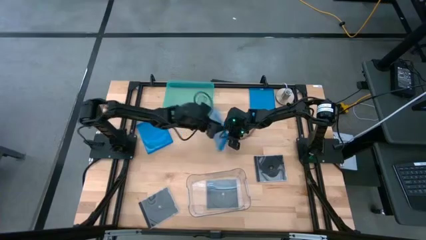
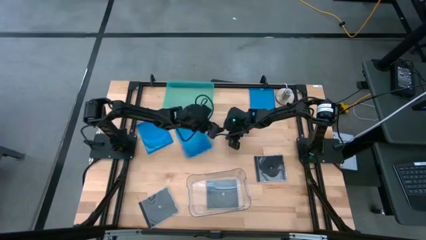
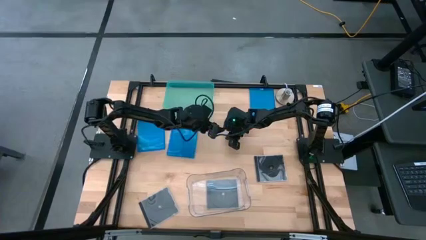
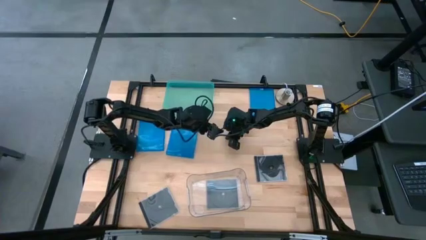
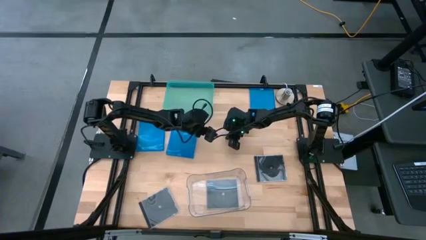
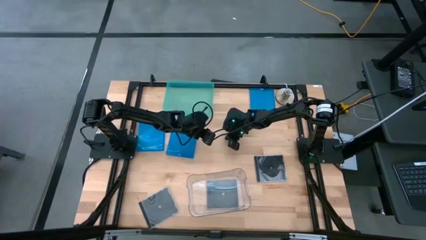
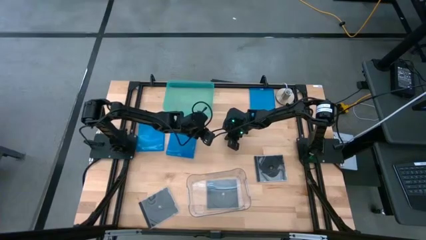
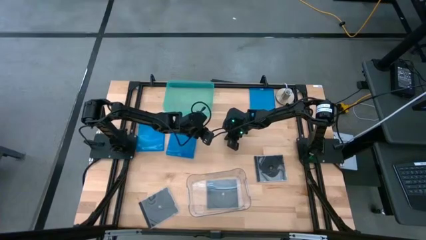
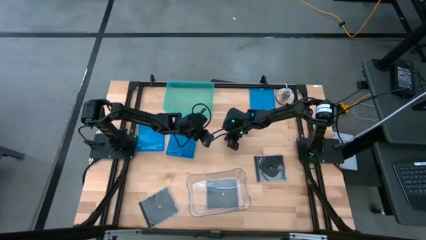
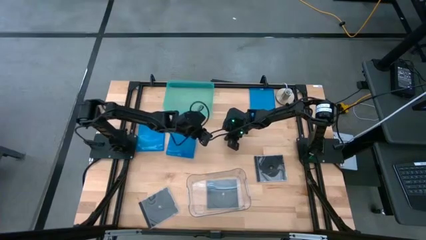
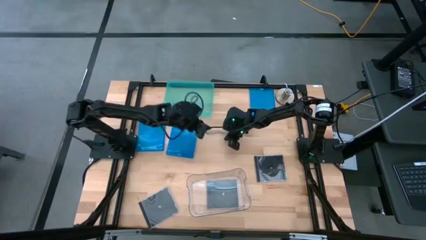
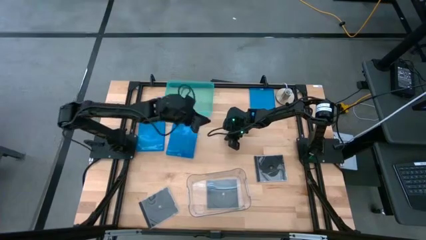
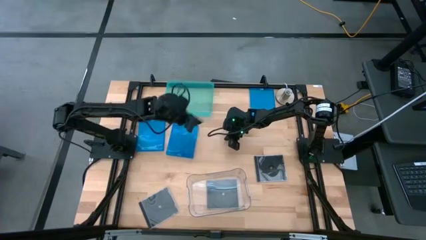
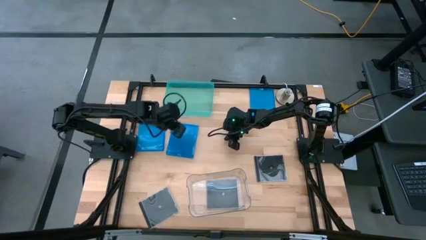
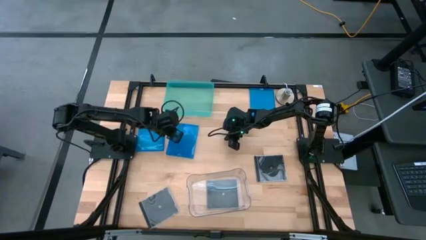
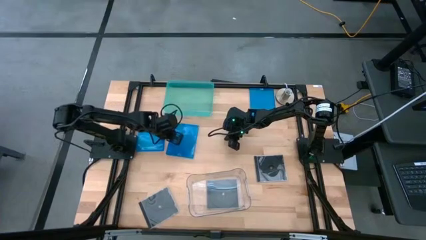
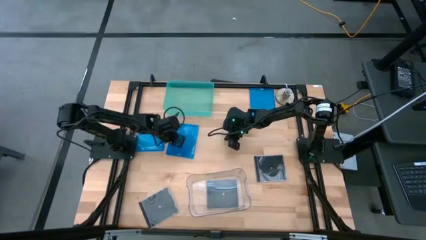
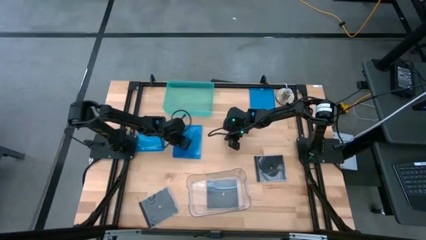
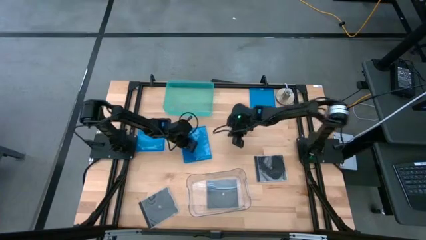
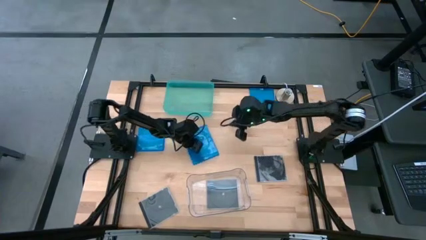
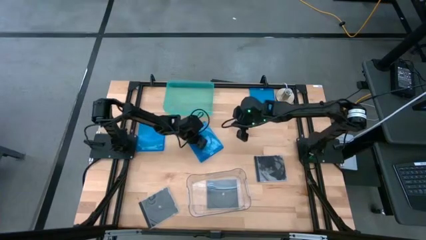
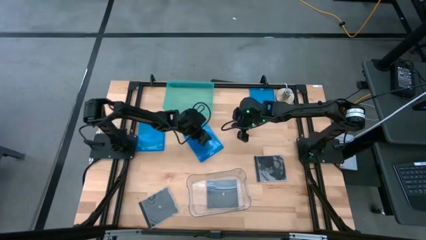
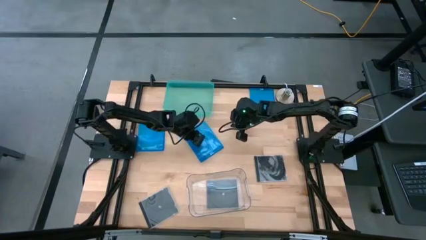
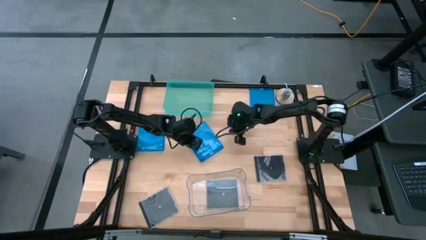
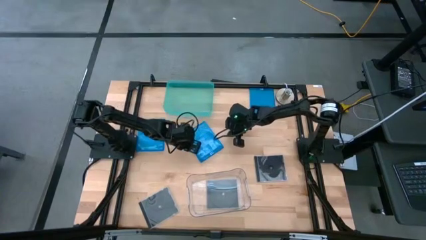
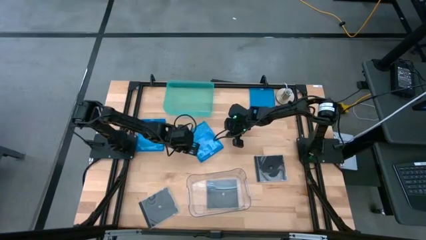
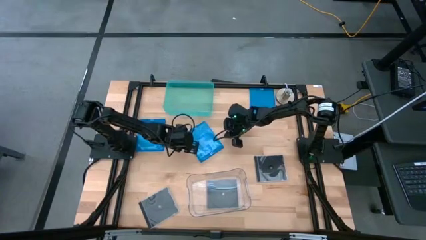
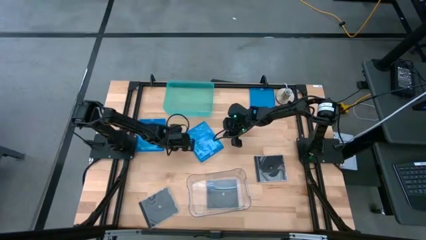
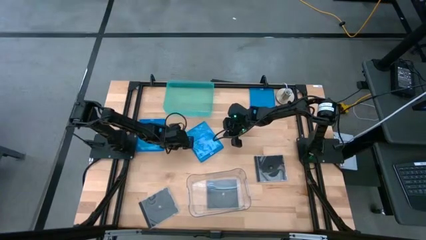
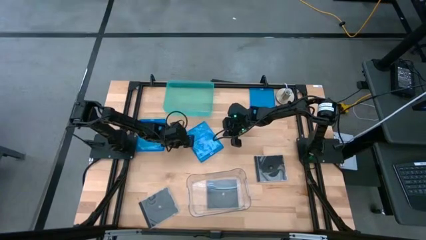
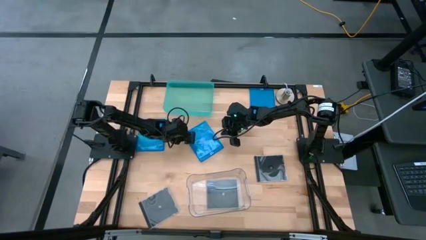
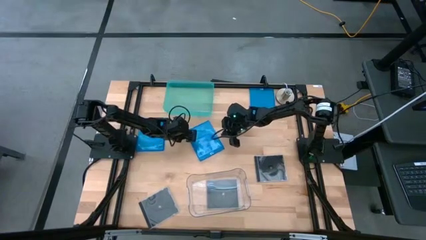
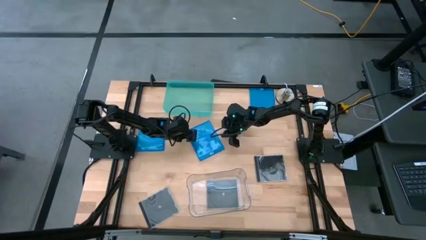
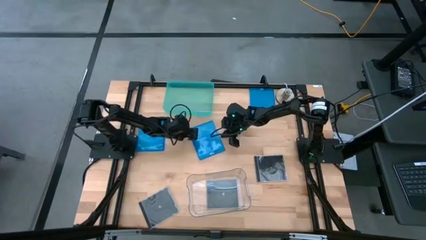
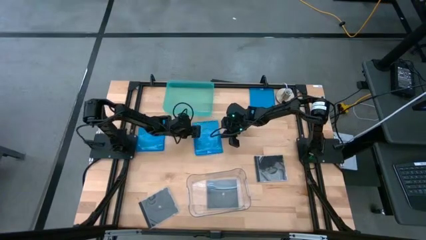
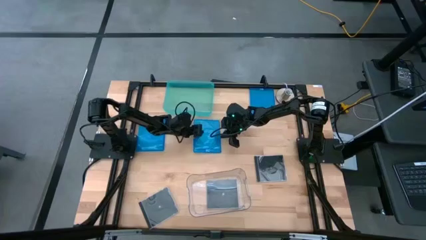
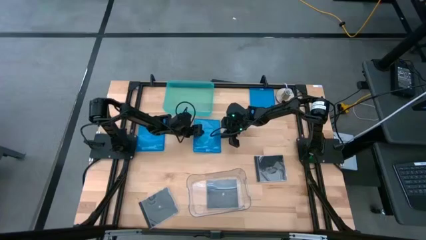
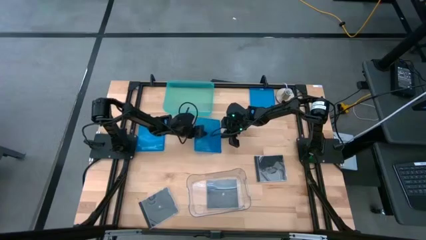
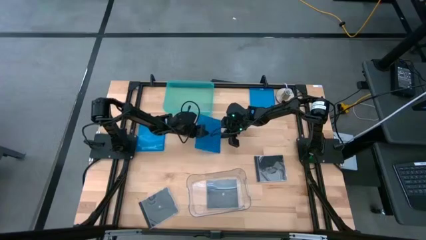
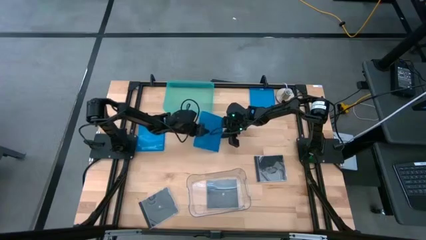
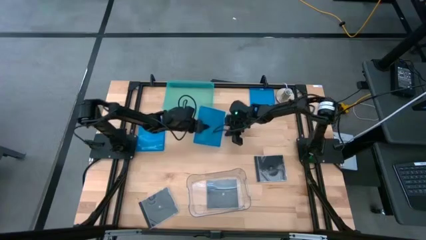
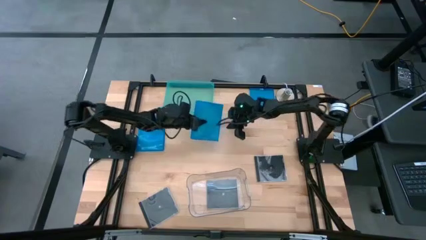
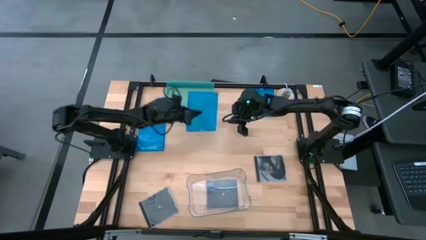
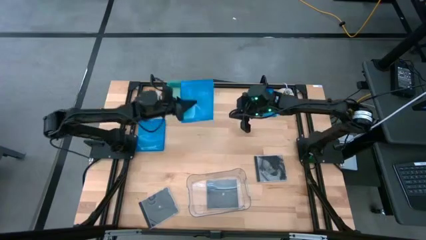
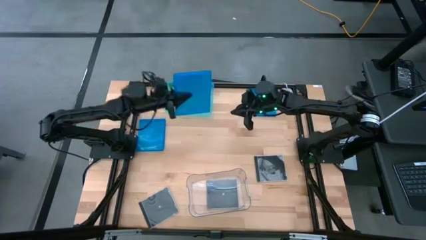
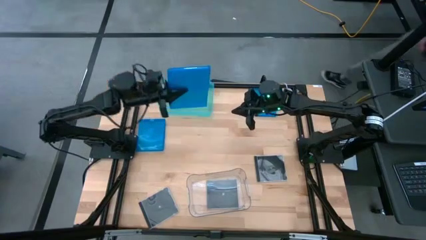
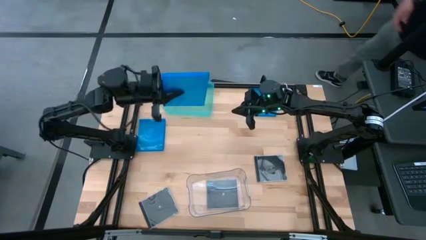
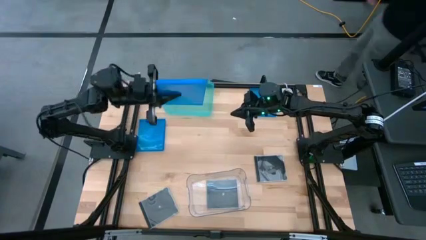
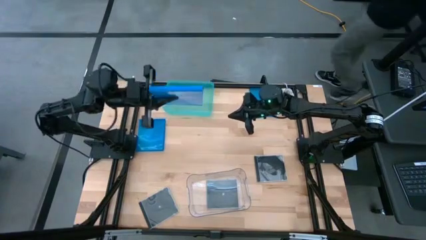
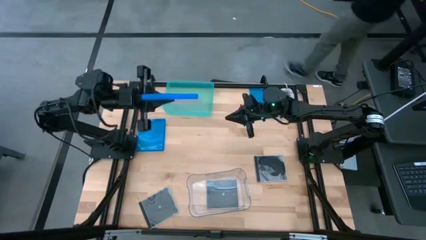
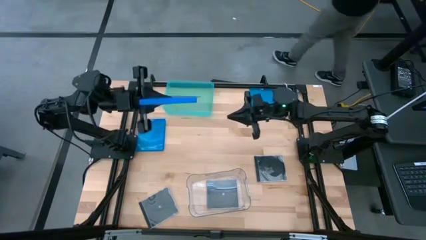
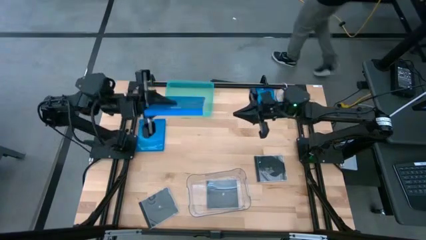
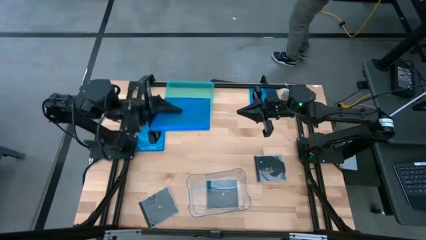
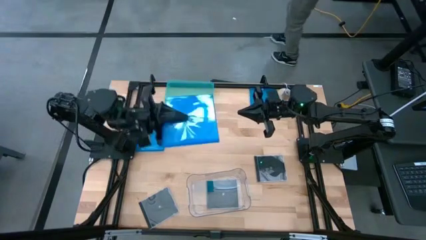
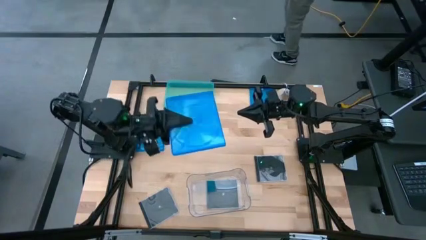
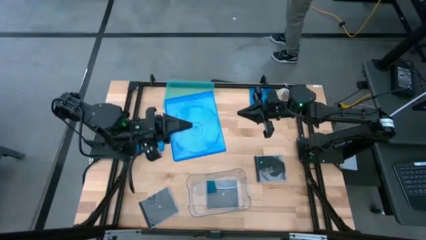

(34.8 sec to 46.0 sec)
Task: Pick & place jewel cases by type
Put the bottom right blue CD case into the green bin
